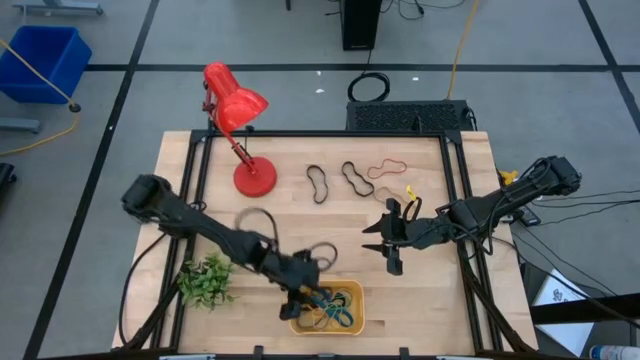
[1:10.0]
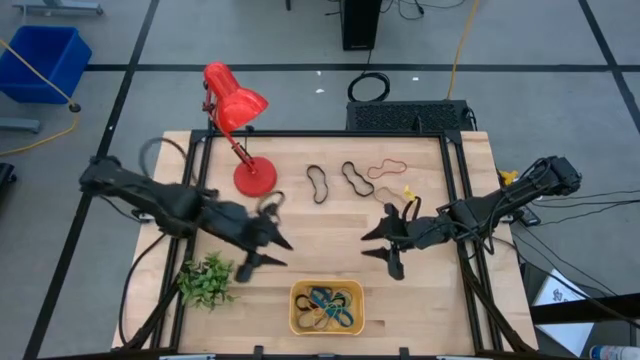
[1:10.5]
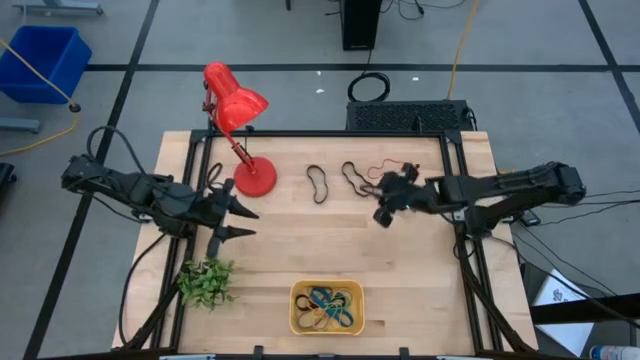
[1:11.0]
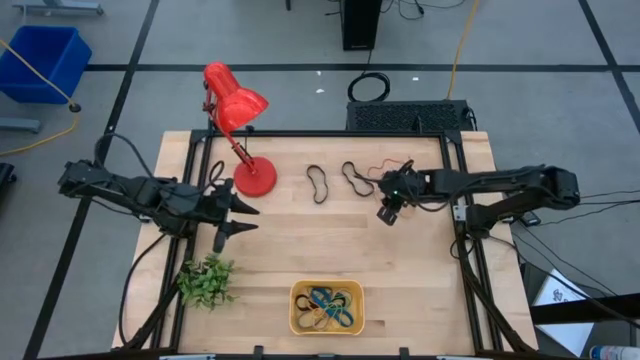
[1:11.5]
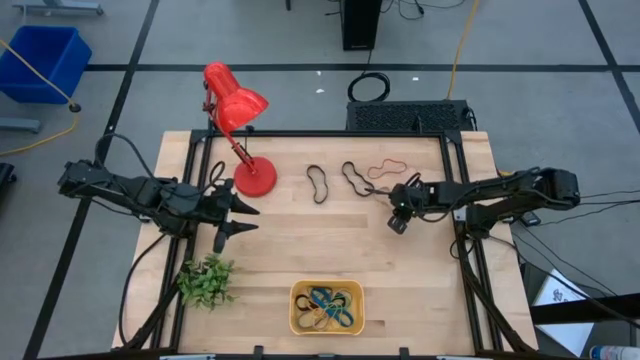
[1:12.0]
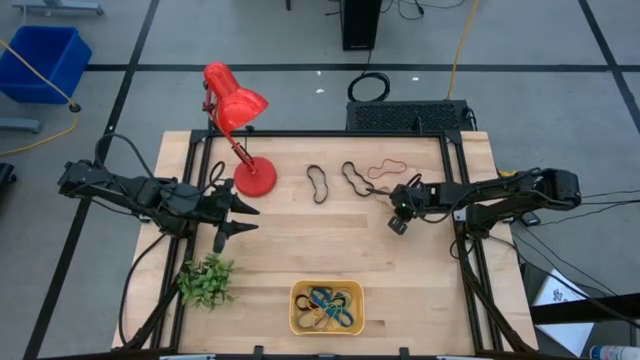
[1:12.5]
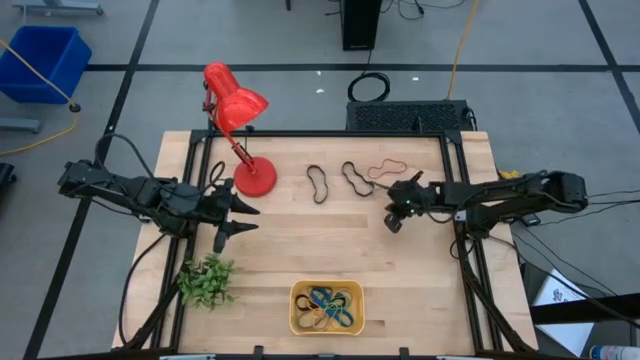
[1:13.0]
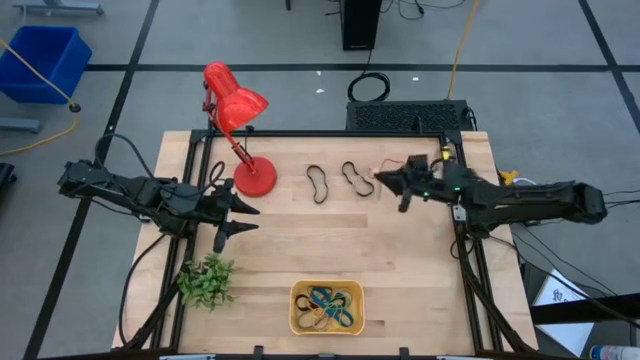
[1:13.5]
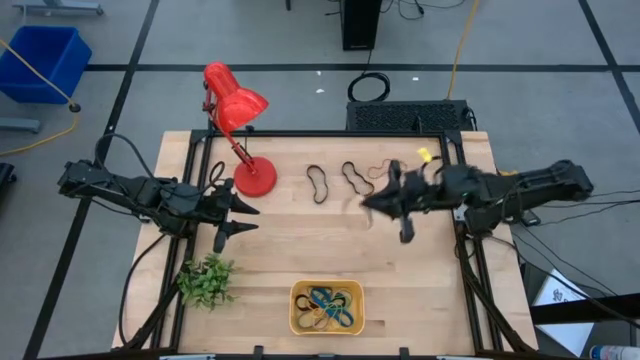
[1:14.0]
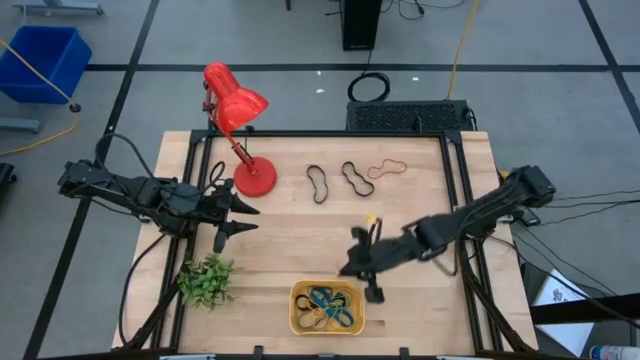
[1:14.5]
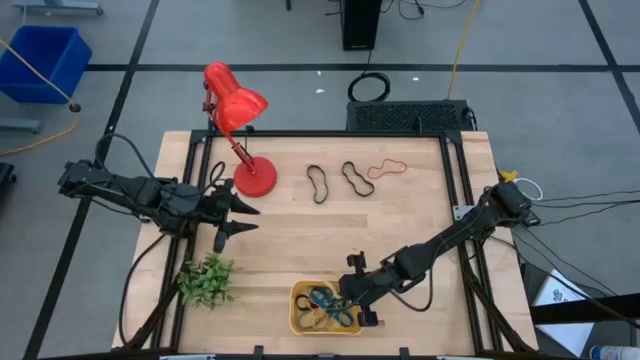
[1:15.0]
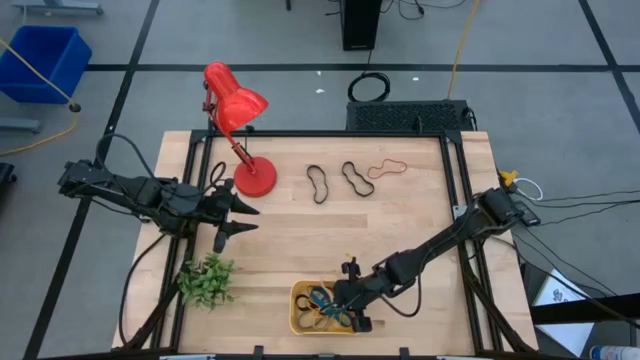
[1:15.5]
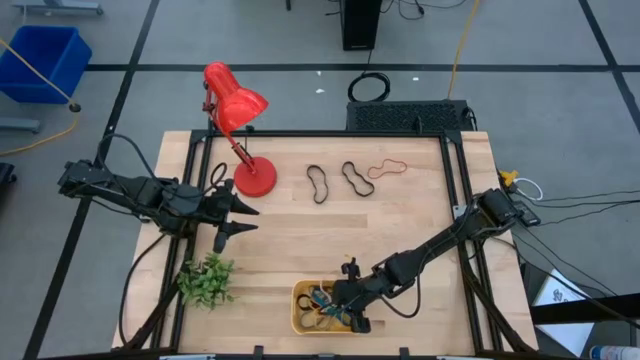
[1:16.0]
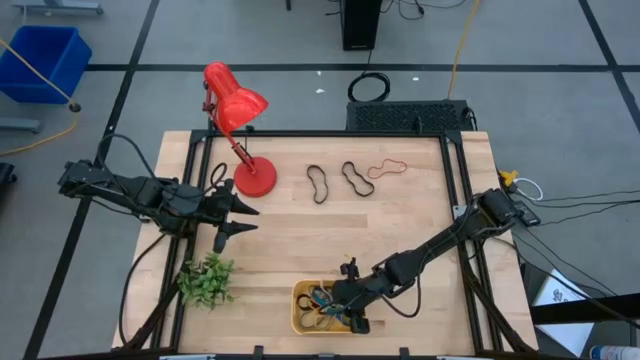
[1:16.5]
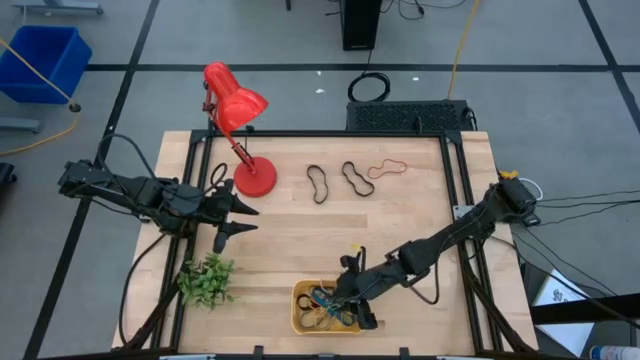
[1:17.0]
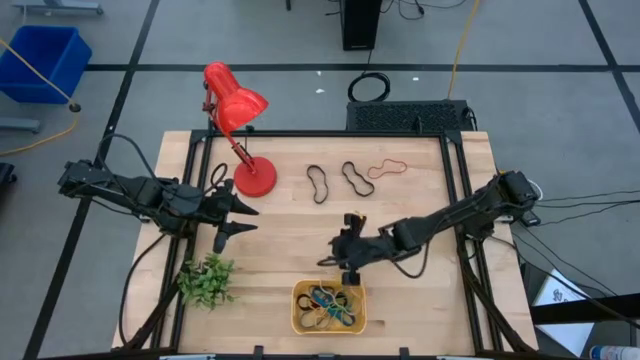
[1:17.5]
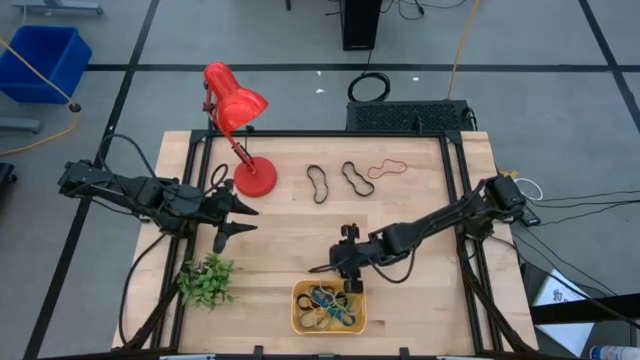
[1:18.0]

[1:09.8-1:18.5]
Task: Pick and place rubber bands into bin
Put the brown rubber band into the bin

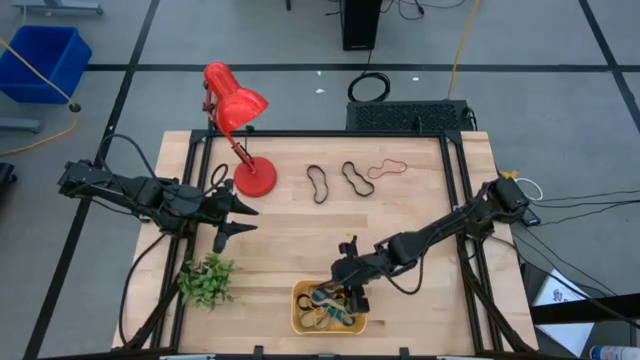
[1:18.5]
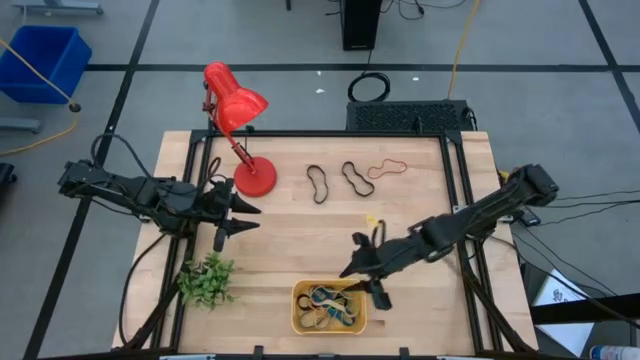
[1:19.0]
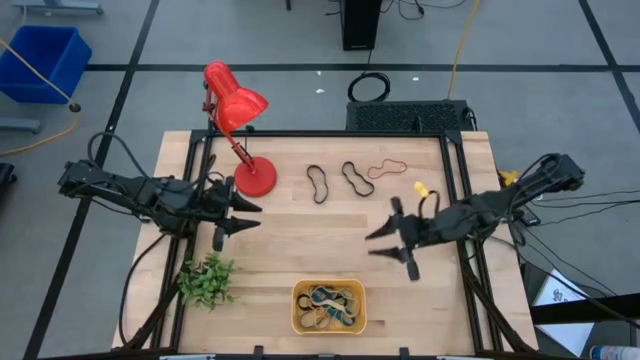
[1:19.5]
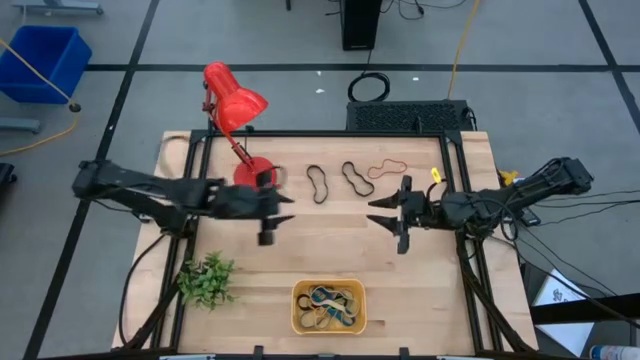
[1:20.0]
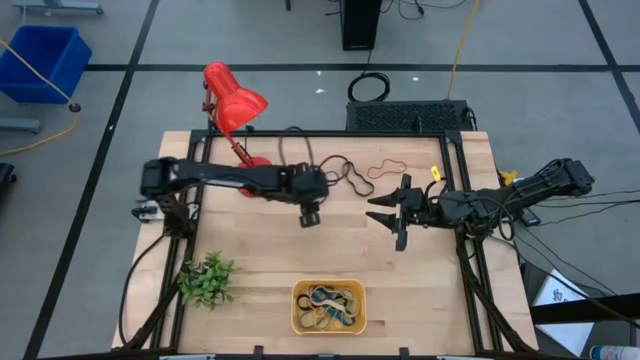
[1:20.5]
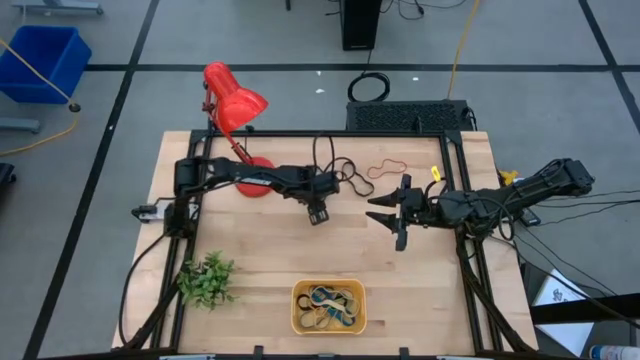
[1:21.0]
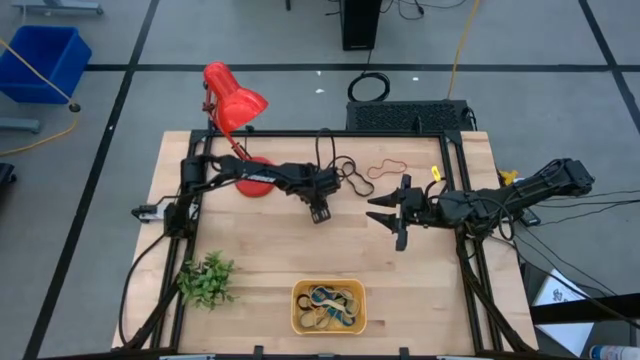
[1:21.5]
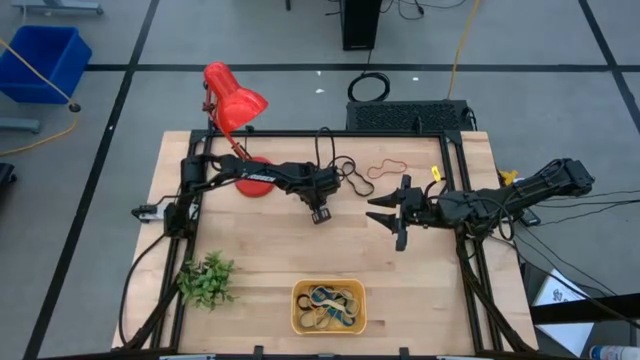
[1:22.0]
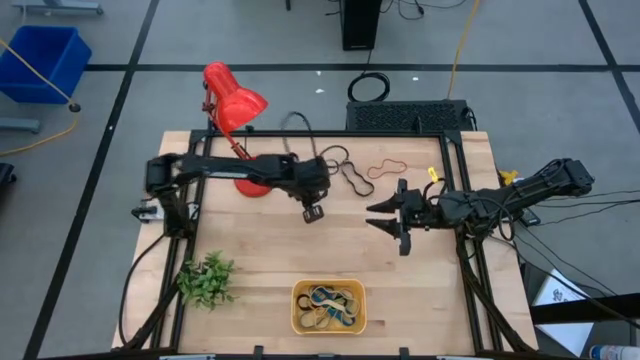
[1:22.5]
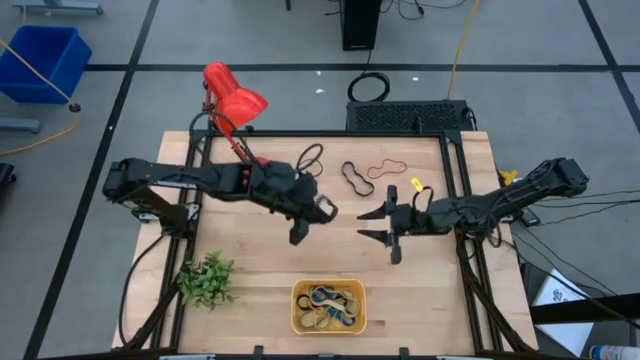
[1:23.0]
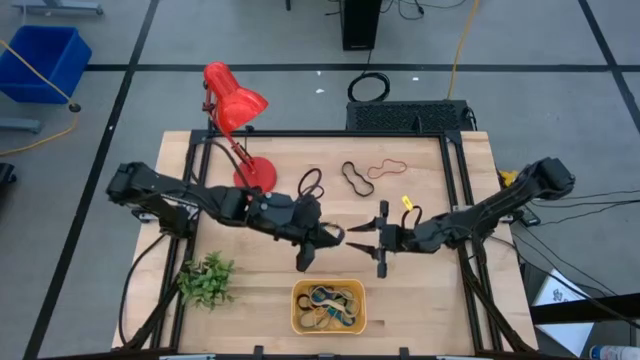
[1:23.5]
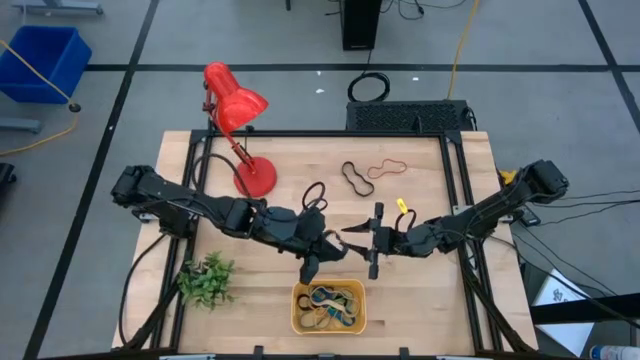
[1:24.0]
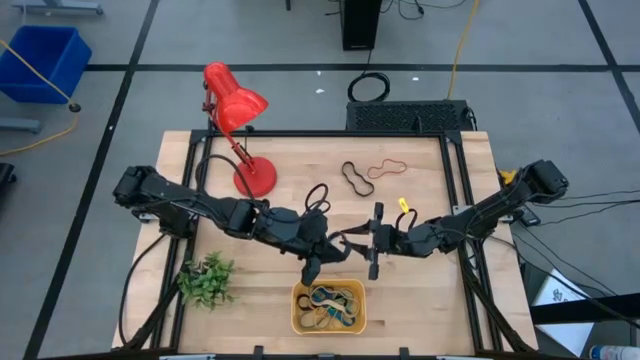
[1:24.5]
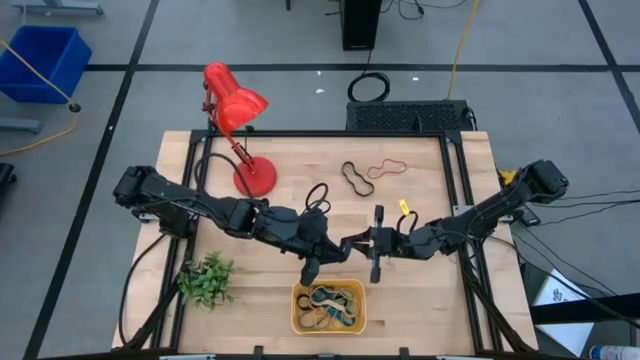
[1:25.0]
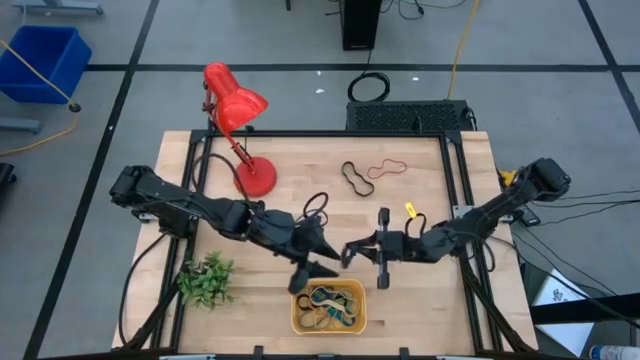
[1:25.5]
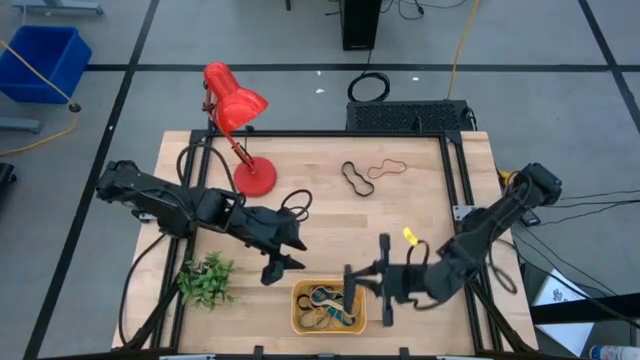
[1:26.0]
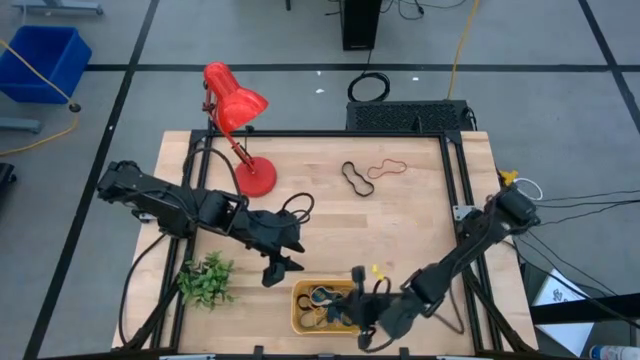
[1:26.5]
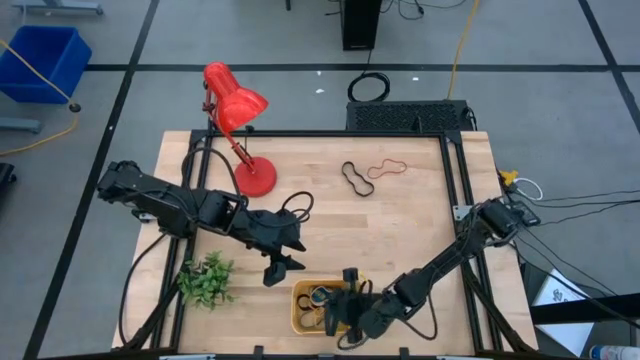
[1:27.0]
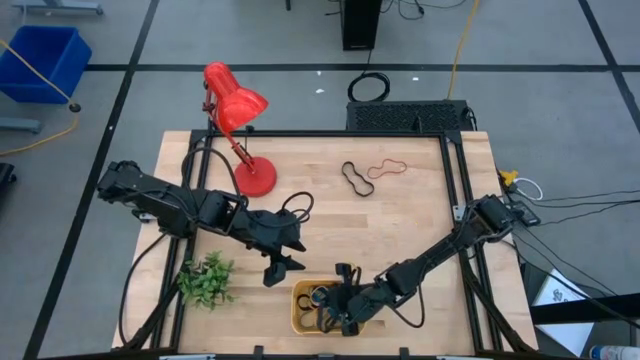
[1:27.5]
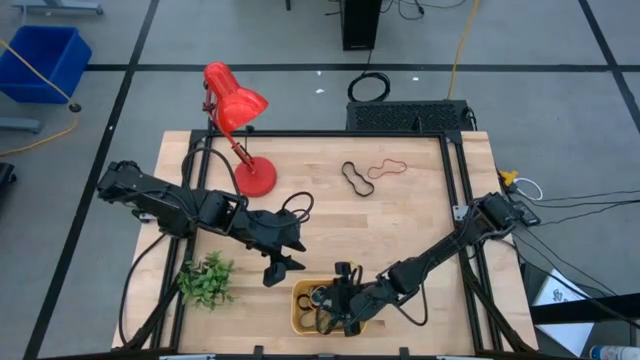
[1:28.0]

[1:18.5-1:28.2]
Put the left black rubber band into the bin

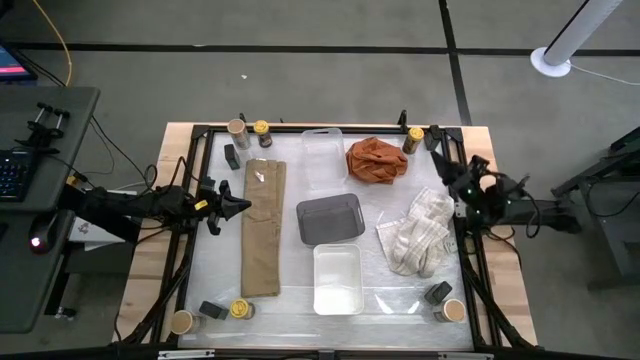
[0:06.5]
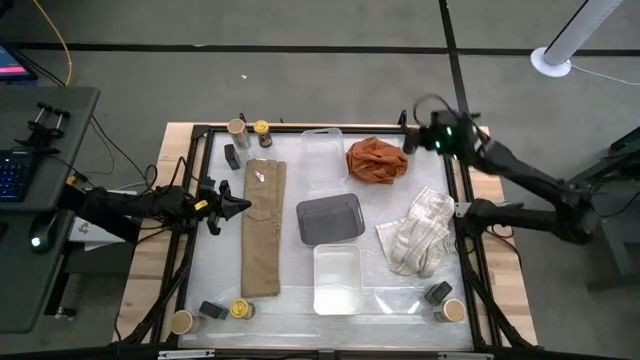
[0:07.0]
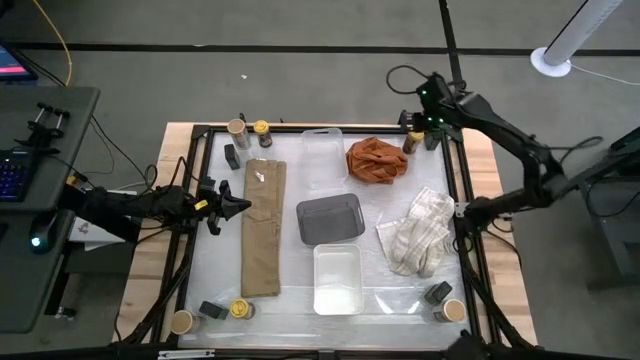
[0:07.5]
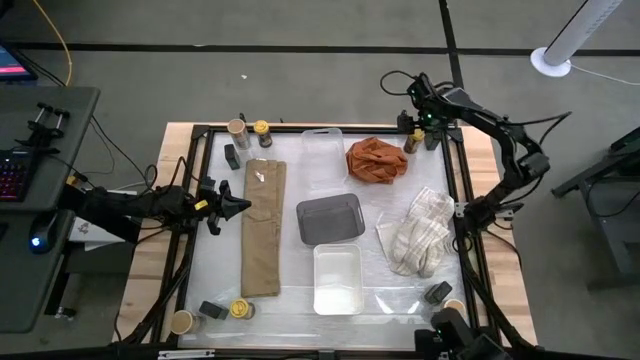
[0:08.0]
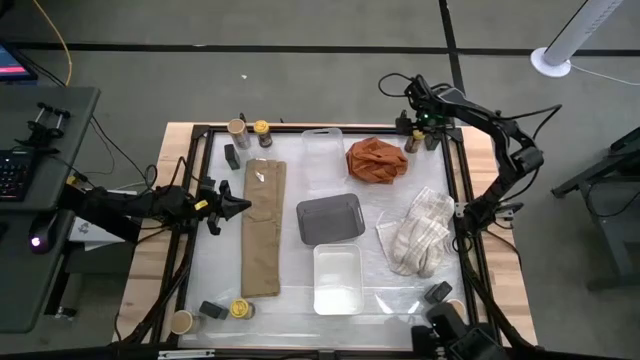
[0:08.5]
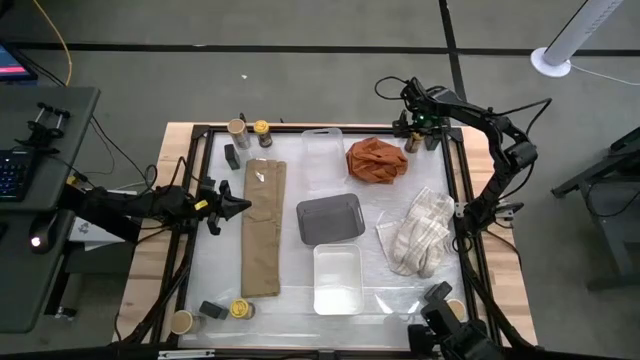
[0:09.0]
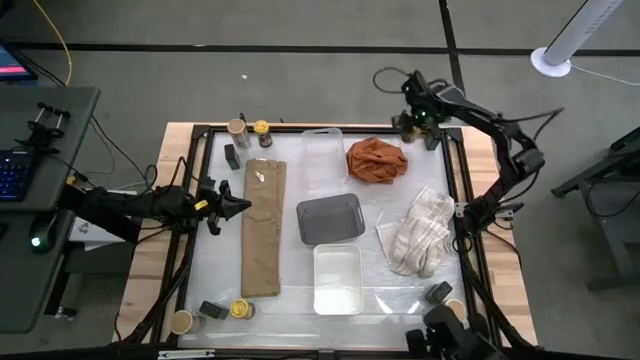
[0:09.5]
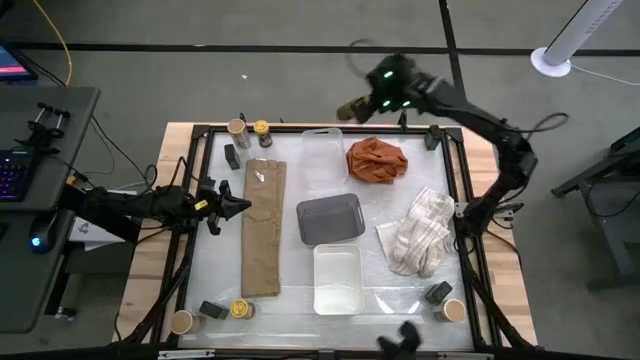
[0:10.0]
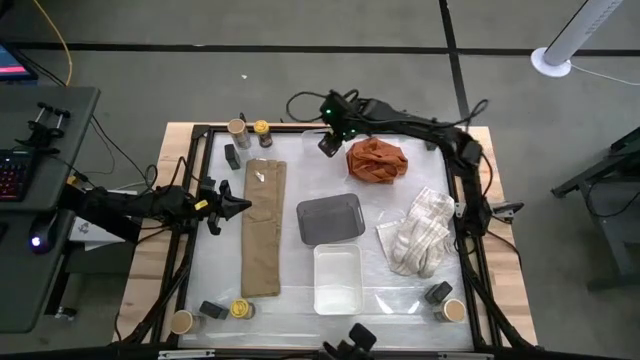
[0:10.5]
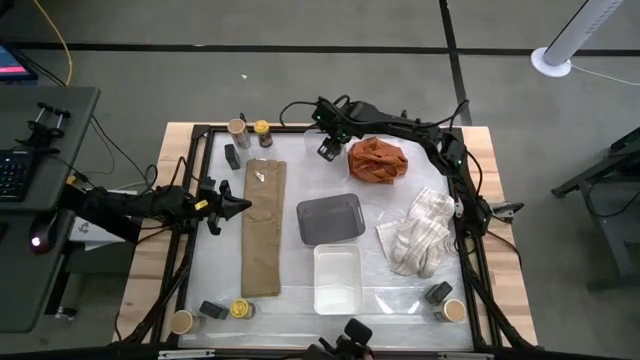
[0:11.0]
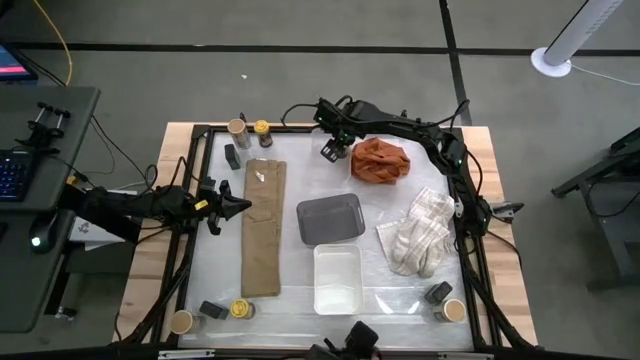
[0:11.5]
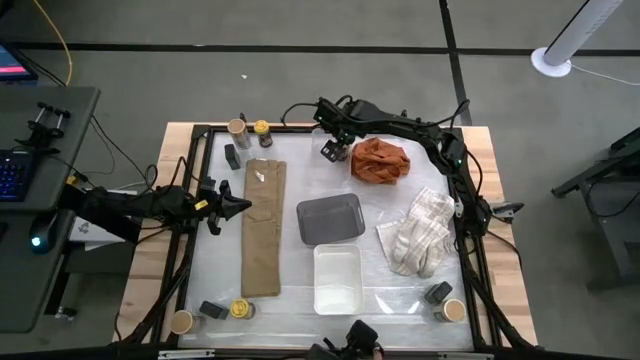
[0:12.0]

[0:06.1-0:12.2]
Task: Sort spices by type
Put the top right yellow seasoning bottle into the transparent bin
